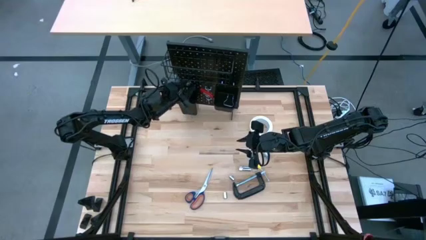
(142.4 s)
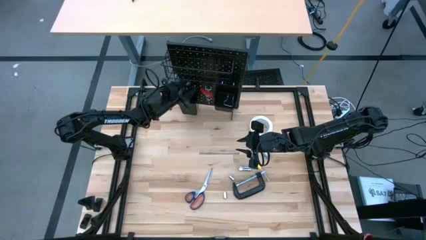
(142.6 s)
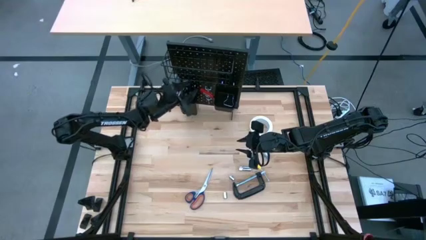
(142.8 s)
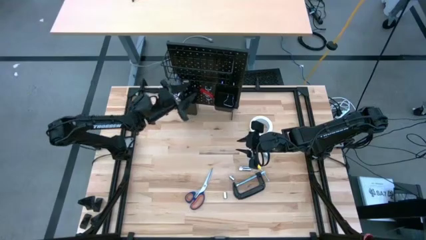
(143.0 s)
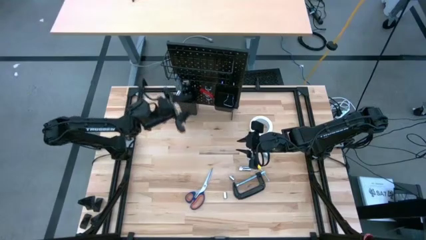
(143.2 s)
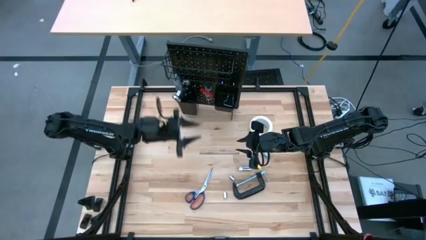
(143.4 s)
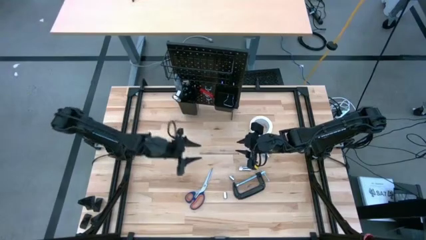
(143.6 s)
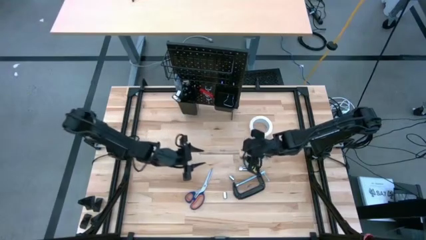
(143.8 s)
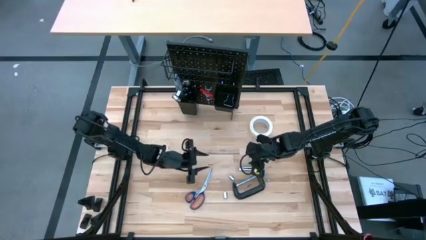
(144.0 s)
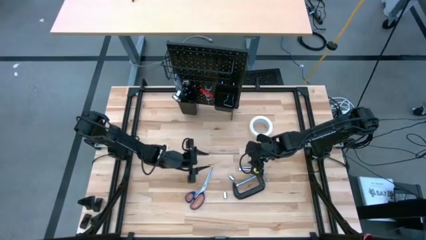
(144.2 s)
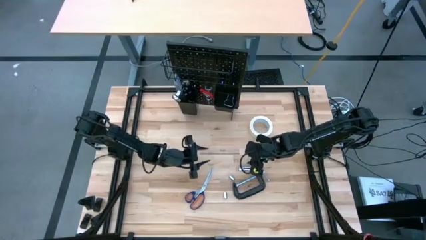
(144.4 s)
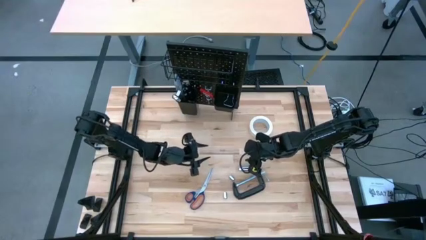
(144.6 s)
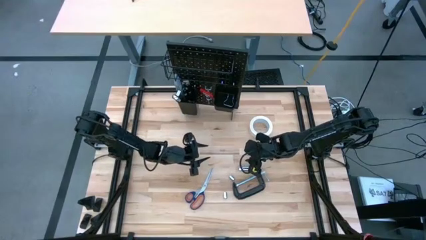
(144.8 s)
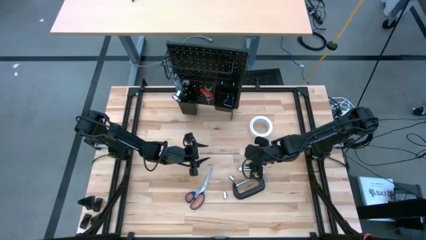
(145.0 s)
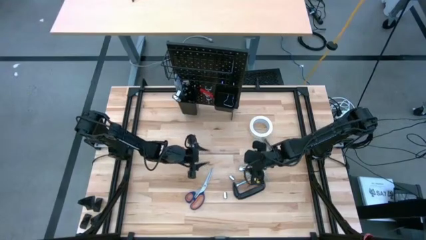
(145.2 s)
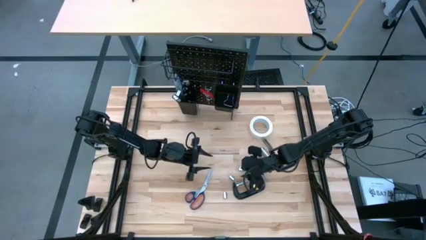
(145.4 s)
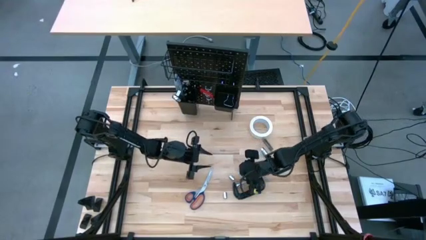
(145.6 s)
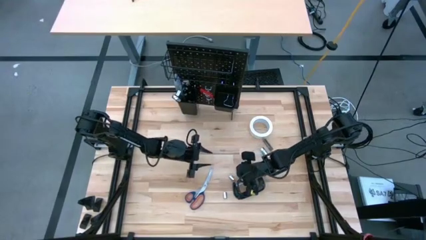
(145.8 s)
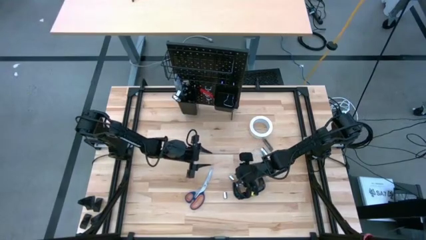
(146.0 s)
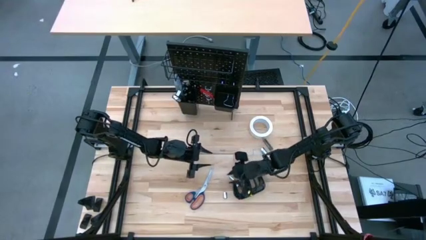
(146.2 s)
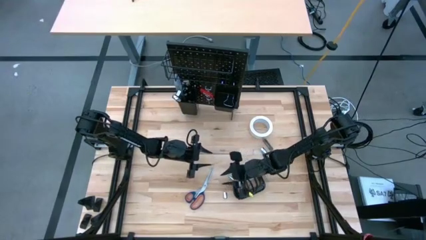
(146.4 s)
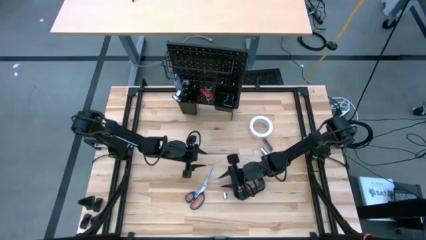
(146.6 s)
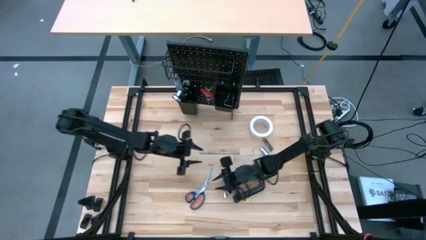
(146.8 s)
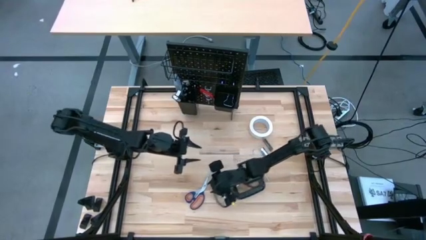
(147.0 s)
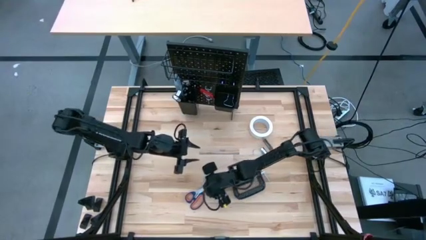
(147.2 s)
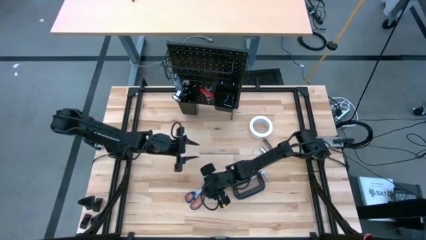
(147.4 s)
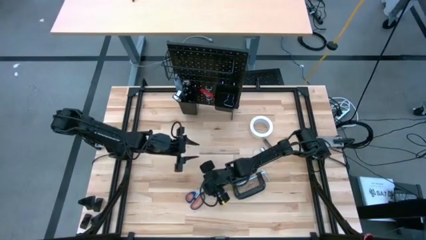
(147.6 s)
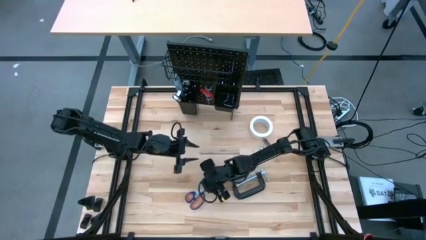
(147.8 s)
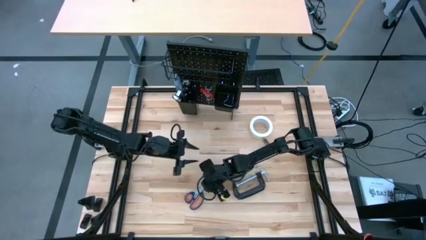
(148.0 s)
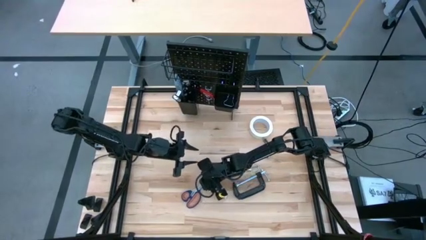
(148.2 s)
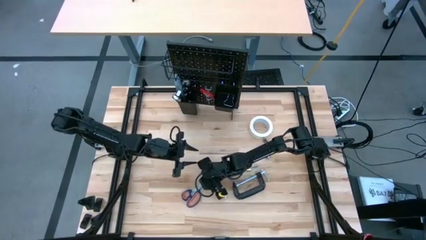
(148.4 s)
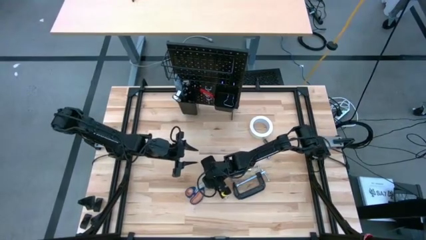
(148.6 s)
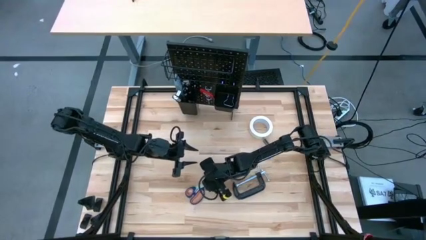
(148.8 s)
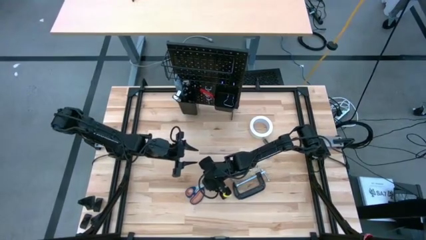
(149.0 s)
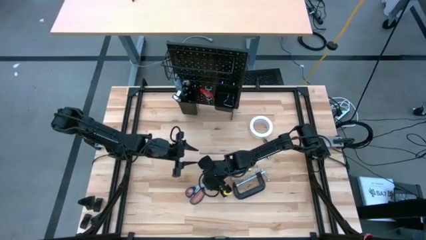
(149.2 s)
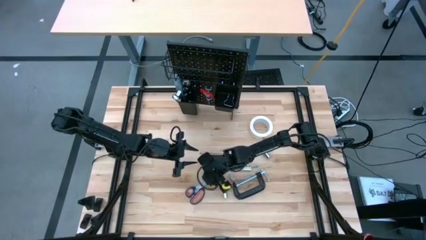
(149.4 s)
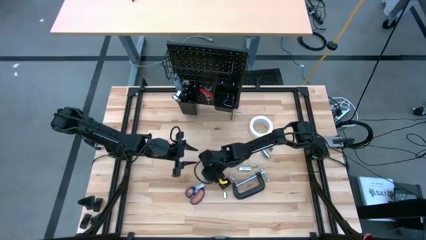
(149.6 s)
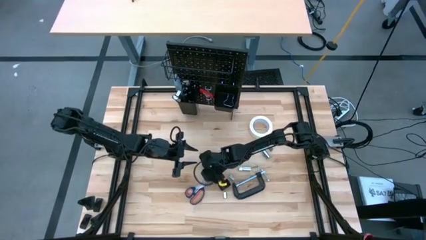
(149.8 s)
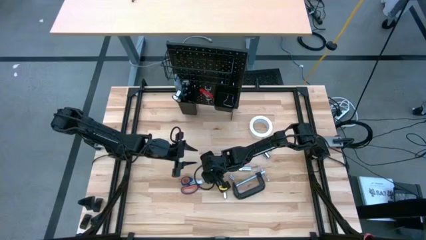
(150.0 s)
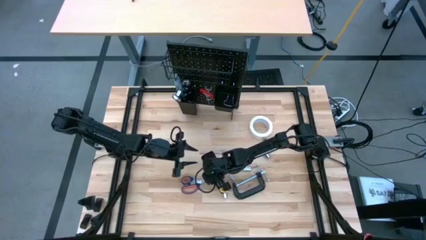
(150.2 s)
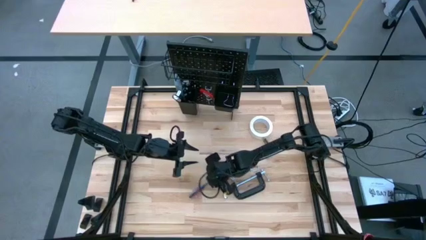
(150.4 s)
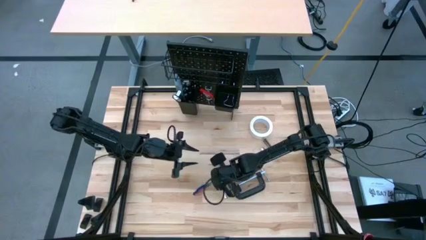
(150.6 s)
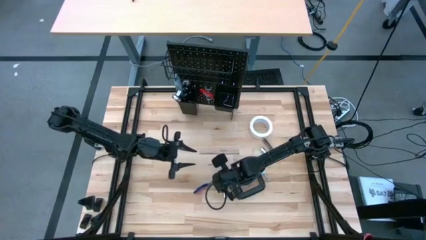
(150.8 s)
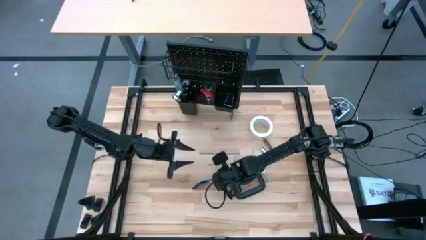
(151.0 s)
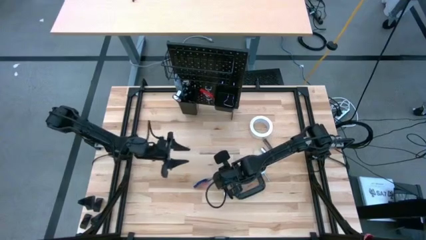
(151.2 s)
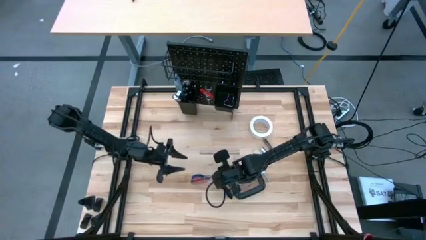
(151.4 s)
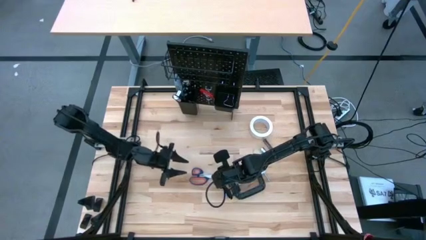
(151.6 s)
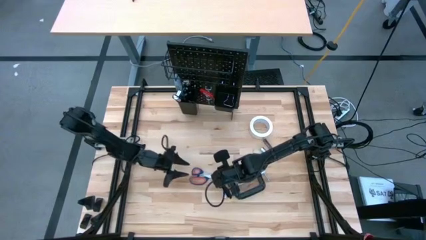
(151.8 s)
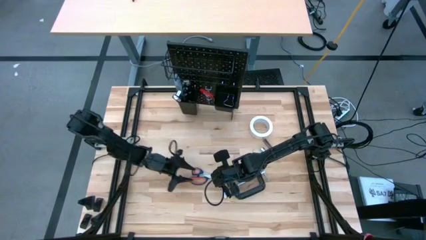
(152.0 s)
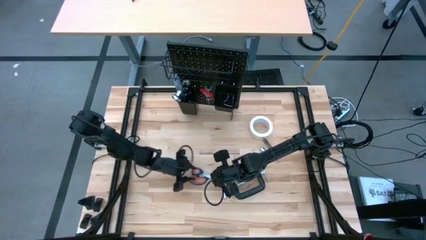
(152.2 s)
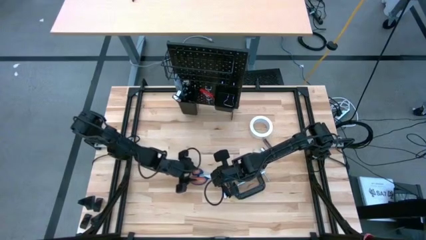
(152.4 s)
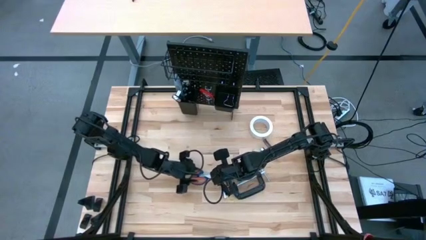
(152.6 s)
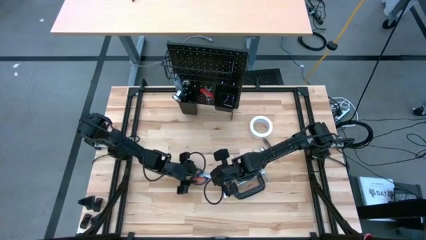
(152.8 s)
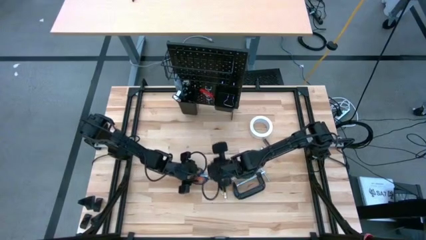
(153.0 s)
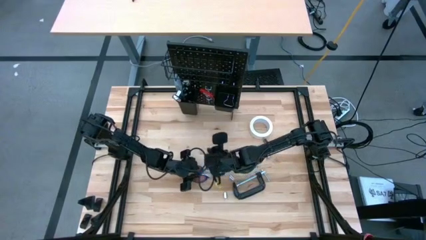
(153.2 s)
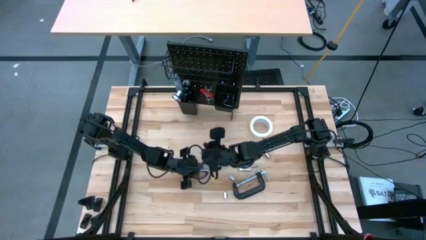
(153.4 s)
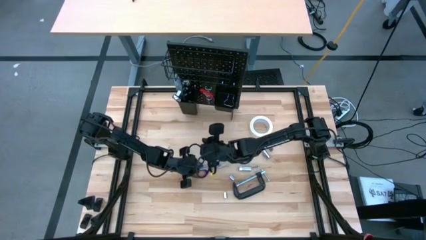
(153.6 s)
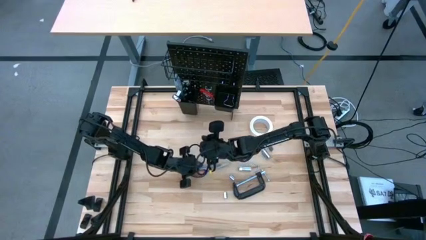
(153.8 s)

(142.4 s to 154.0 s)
Task: Hang tools onto peg board
Put the blue scissors into the left black bin on the peg board
